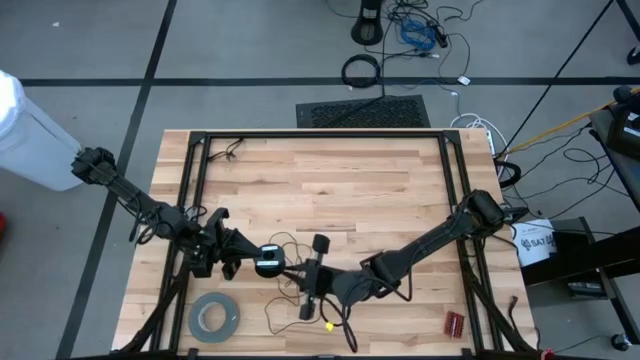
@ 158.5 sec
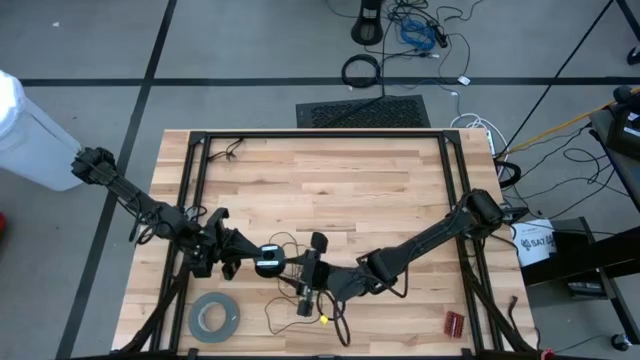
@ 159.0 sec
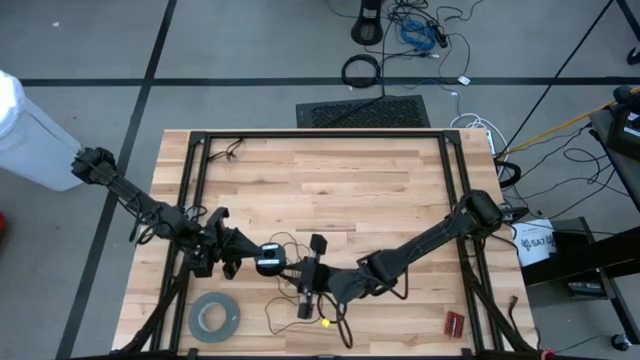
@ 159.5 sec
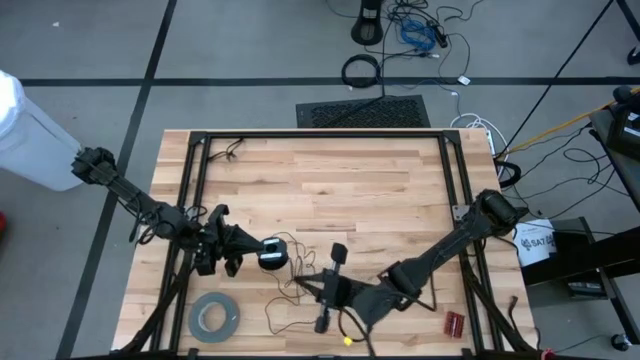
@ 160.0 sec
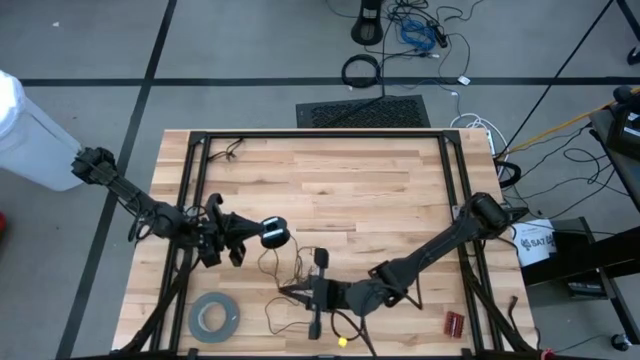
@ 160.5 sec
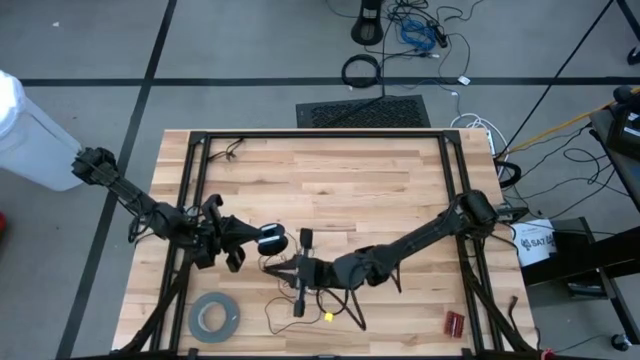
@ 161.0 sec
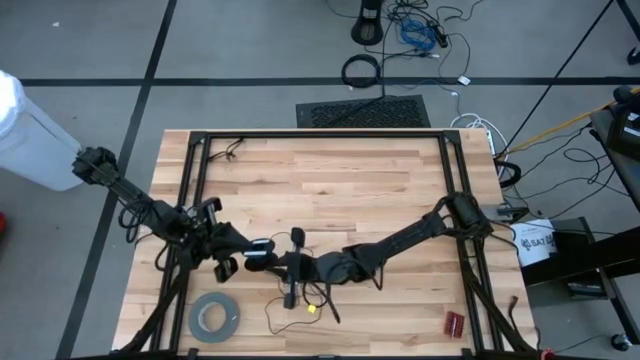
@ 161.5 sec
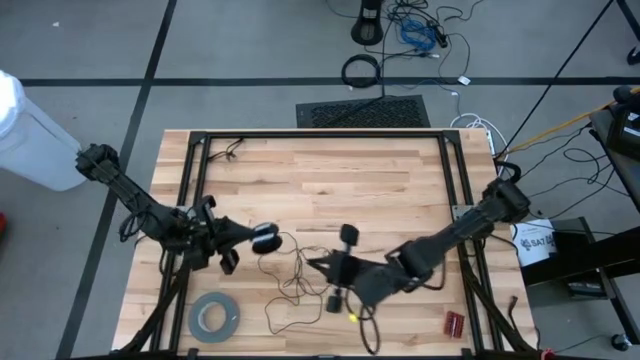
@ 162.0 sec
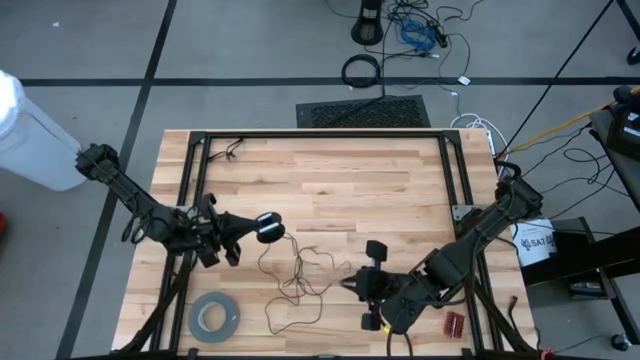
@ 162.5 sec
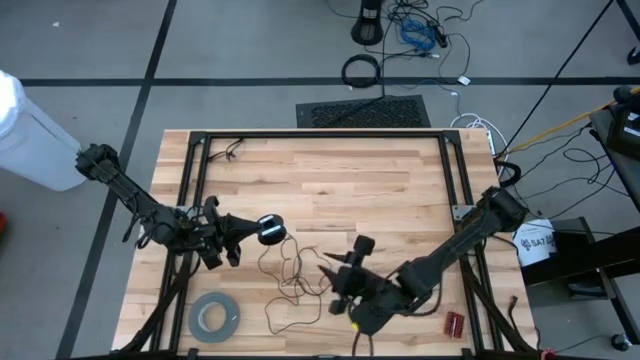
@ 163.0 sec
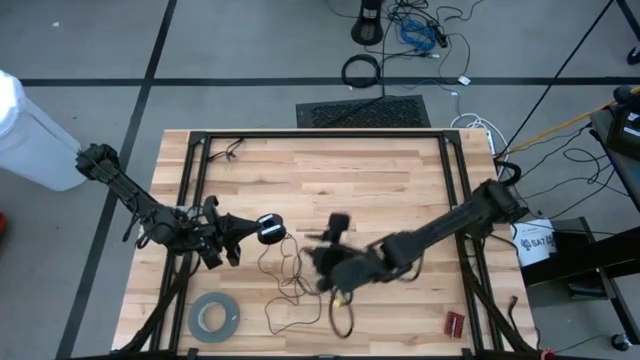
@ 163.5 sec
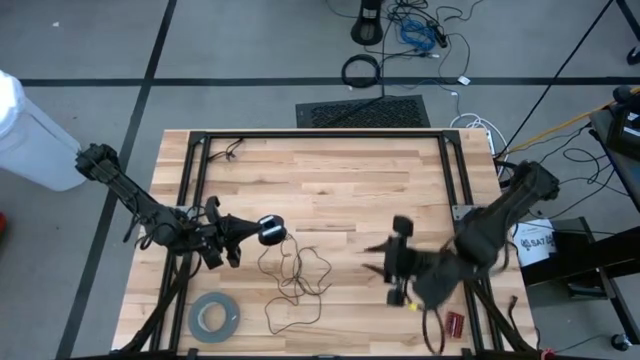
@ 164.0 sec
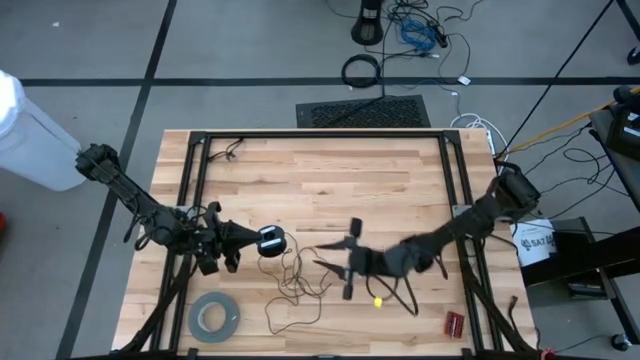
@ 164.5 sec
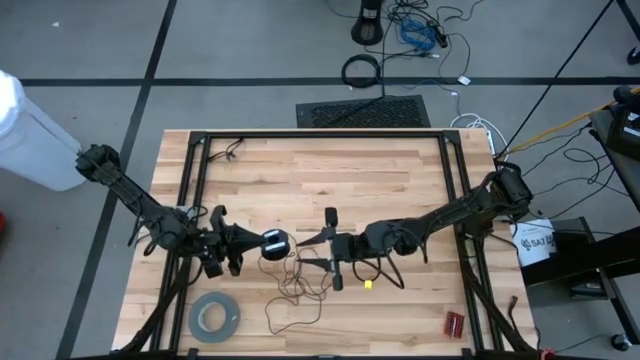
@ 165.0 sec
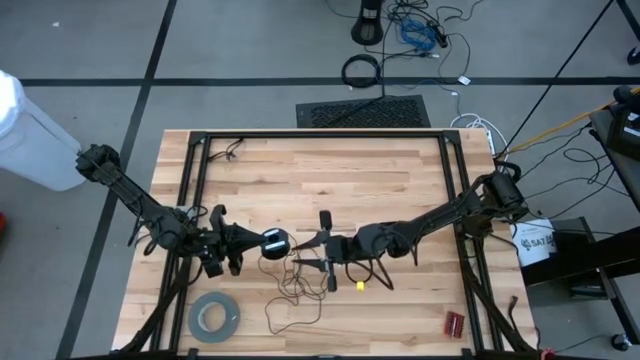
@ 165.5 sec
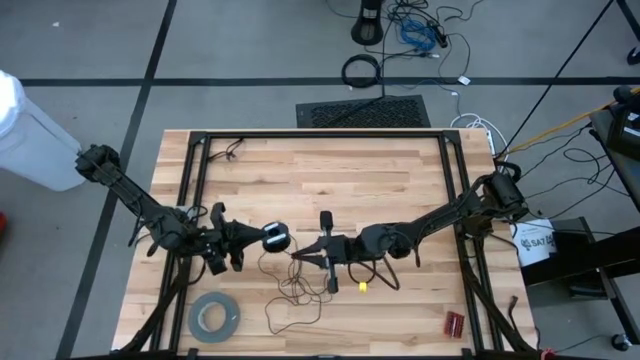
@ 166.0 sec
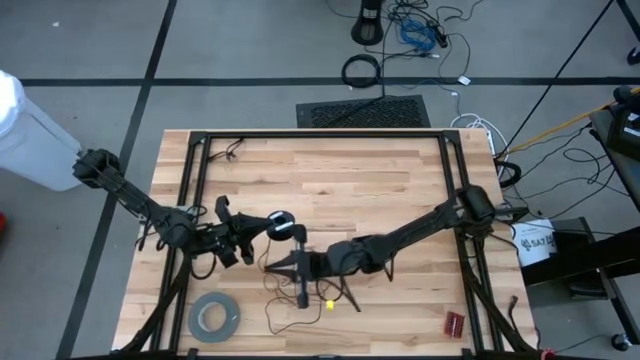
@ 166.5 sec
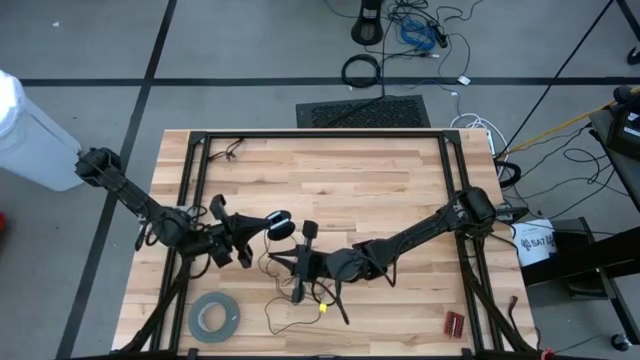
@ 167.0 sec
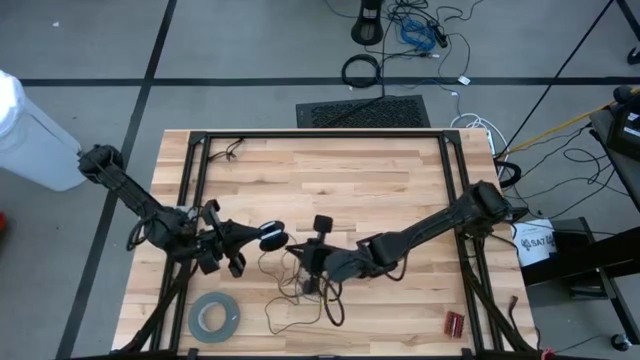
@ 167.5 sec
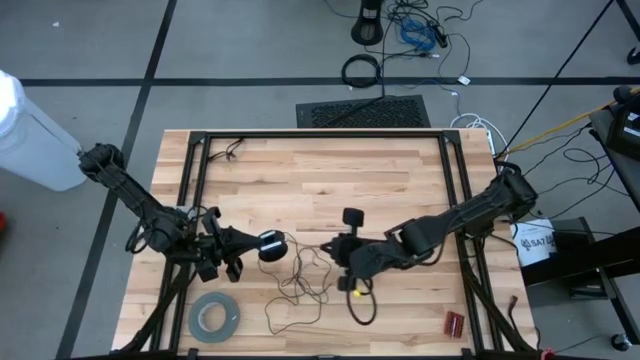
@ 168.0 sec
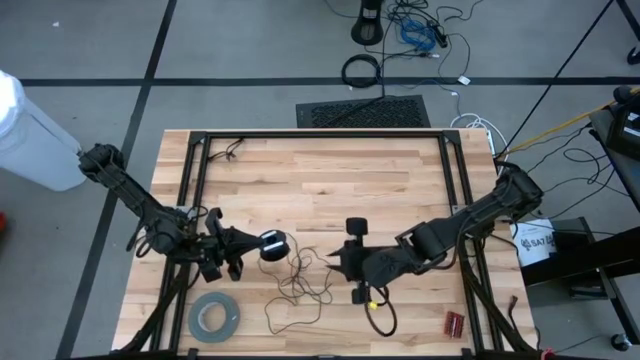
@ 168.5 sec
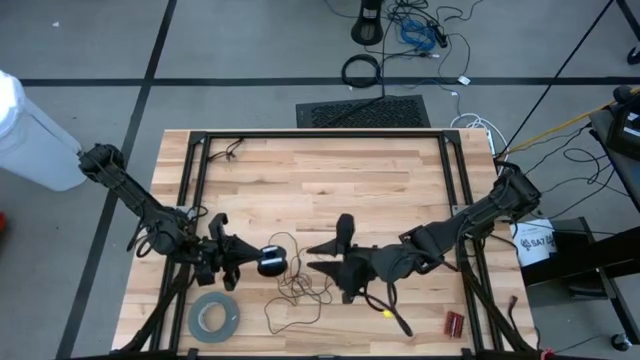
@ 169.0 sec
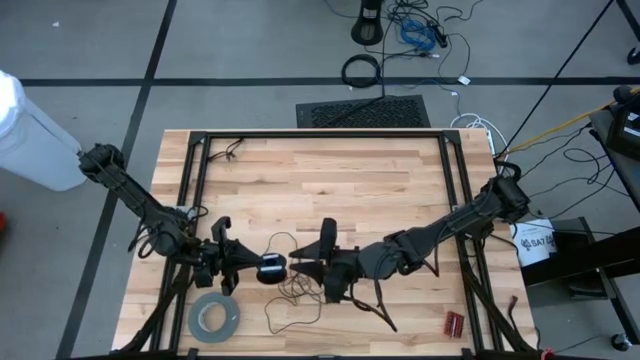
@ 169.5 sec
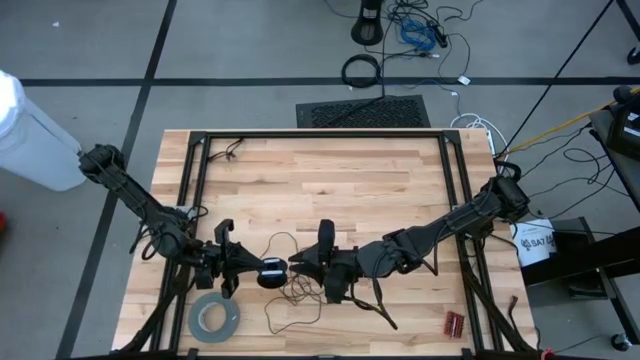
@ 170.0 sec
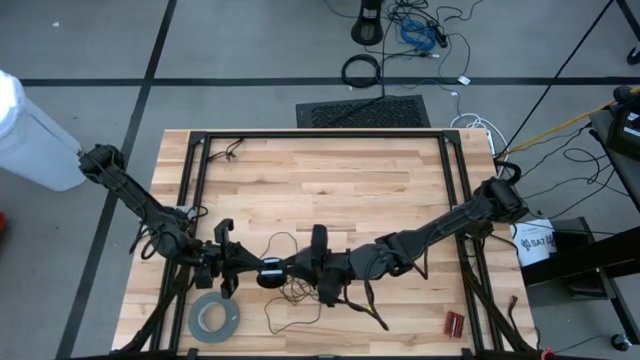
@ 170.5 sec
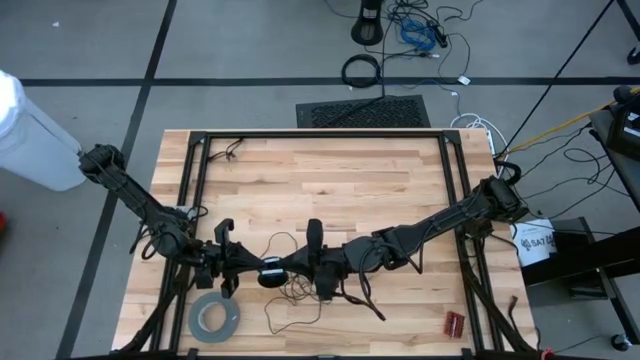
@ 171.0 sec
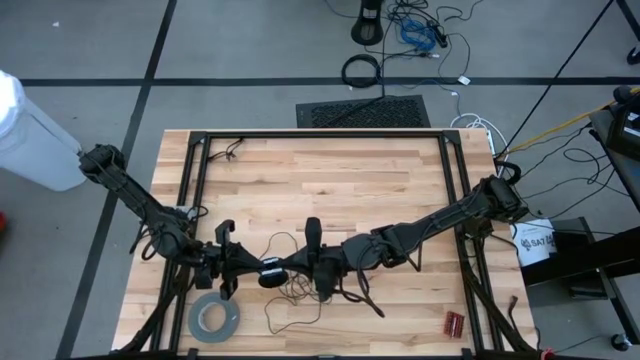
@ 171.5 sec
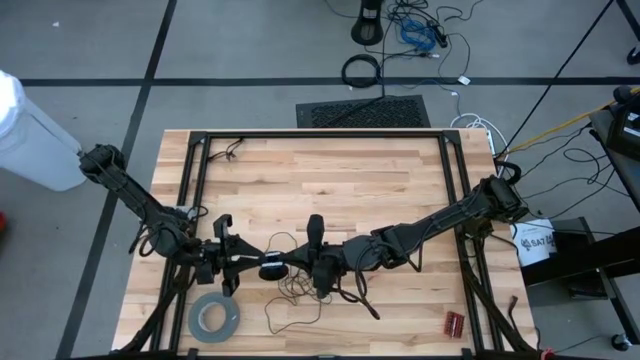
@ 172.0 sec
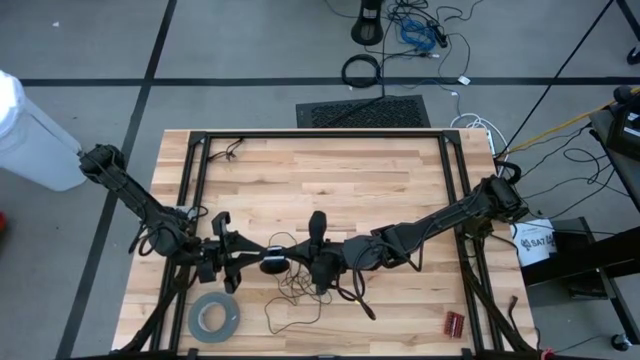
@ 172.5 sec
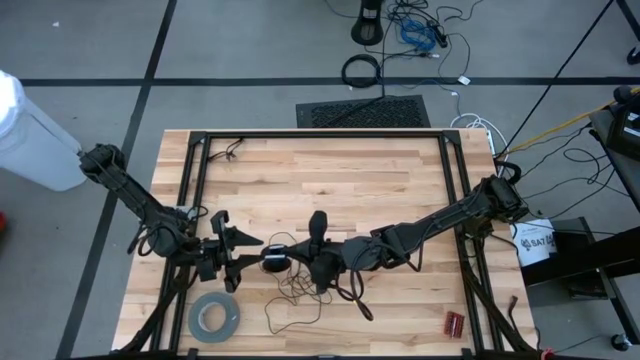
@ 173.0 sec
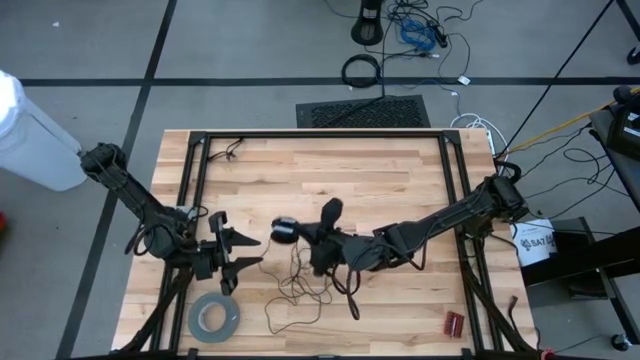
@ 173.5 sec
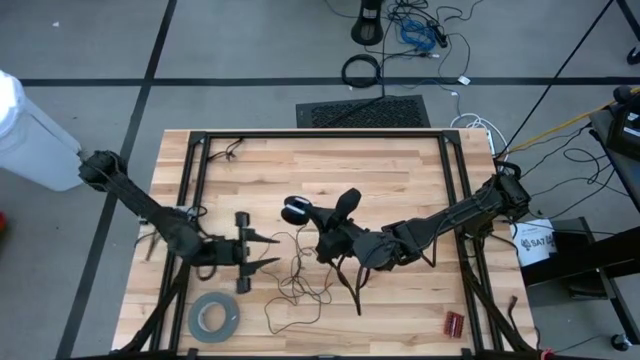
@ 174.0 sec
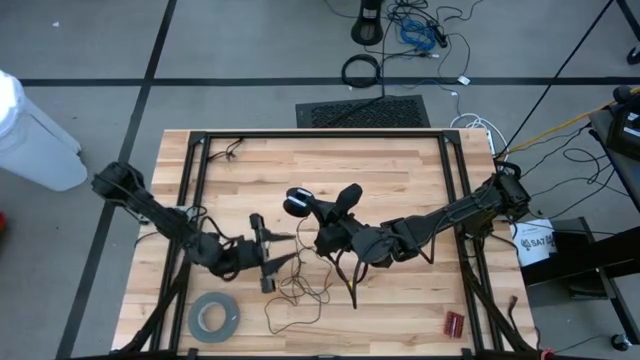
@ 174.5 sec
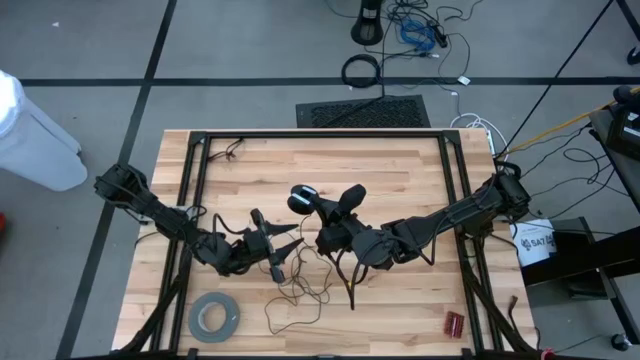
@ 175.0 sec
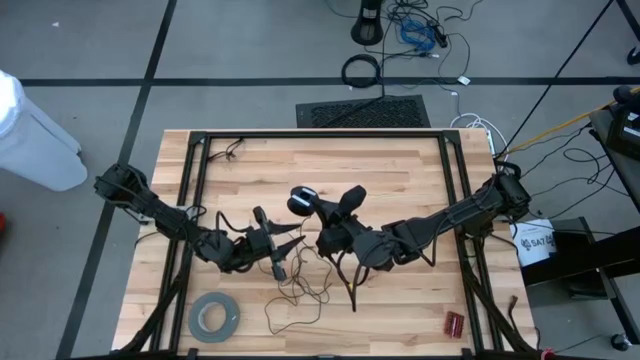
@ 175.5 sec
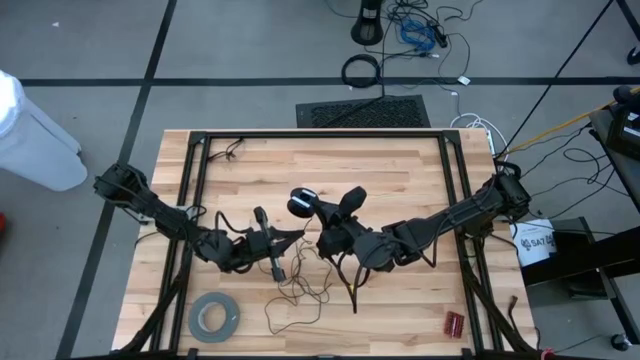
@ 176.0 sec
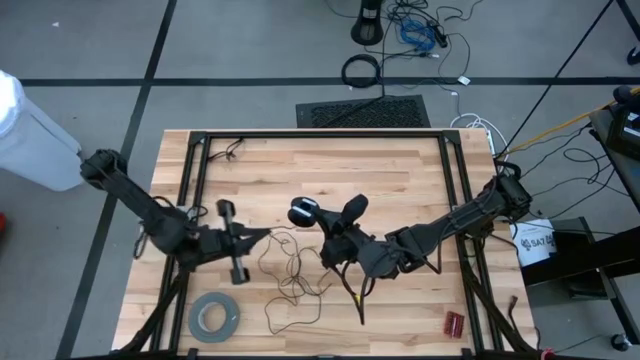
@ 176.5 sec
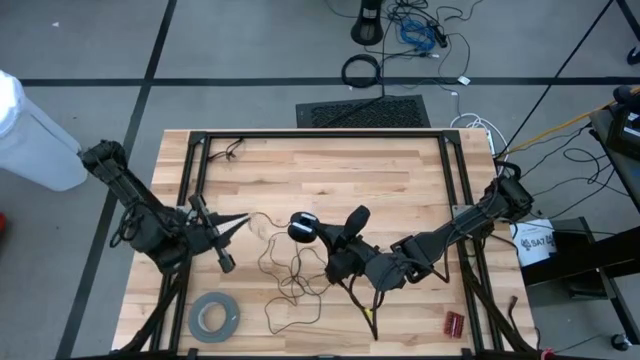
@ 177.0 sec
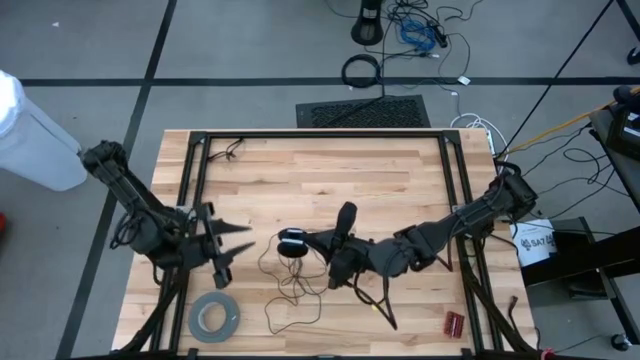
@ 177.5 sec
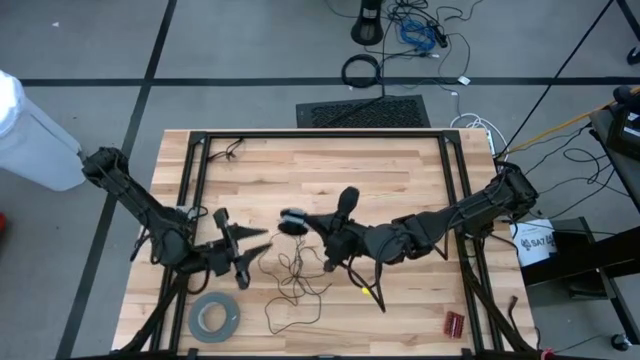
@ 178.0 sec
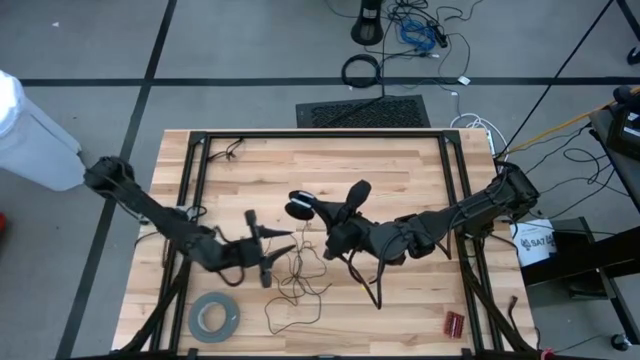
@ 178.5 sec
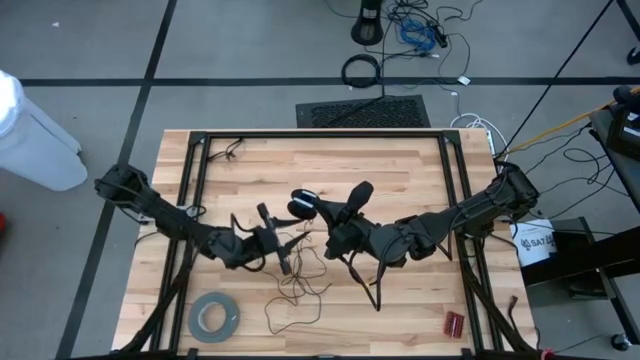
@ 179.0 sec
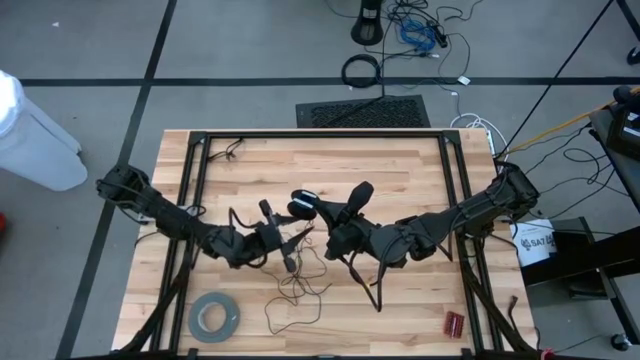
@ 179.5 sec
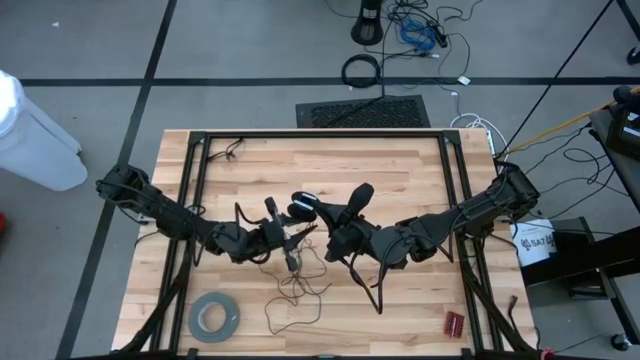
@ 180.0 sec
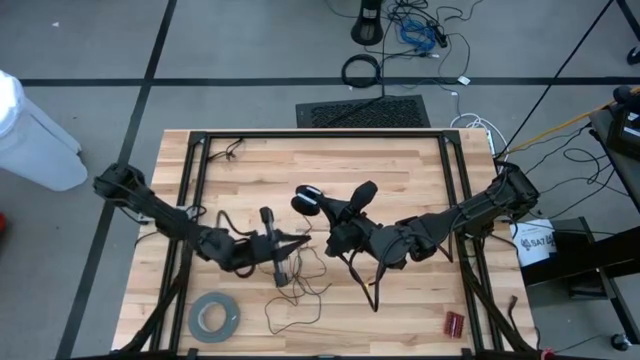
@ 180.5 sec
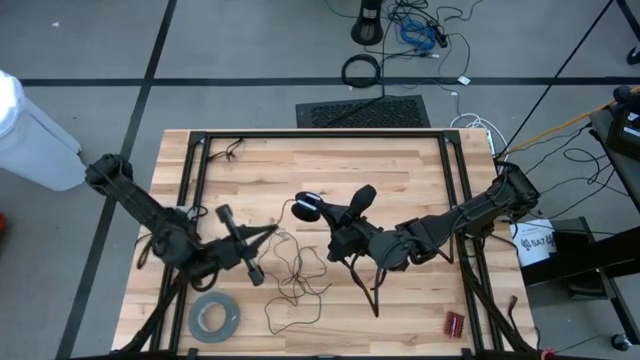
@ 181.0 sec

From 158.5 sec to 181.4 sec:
Task: Coil cords
Uncoil the black wire from the spool
